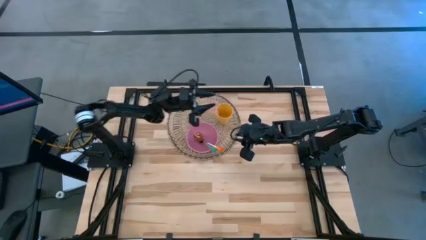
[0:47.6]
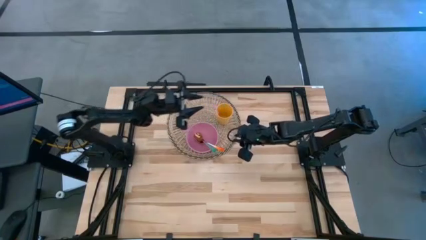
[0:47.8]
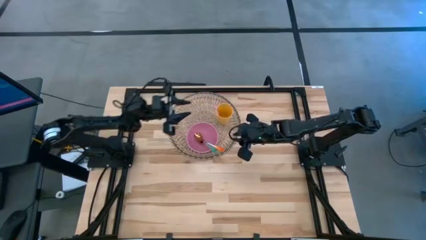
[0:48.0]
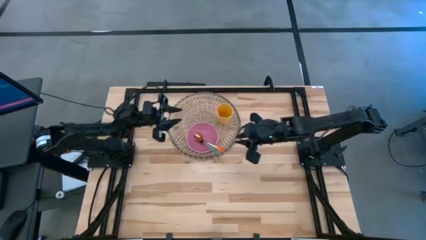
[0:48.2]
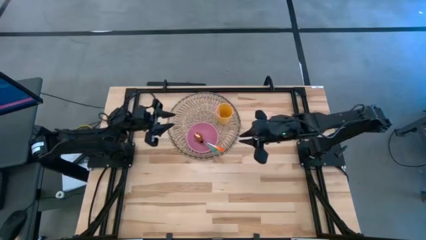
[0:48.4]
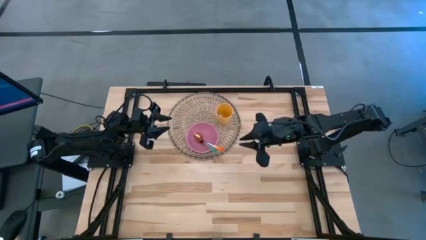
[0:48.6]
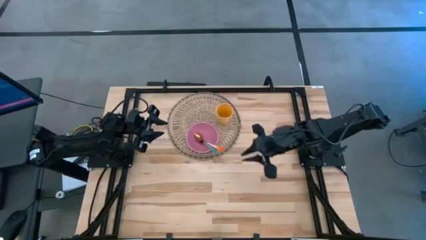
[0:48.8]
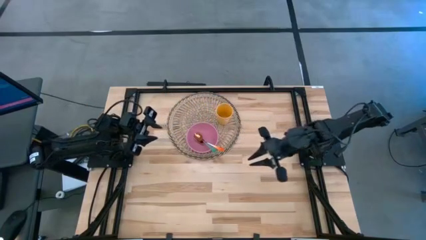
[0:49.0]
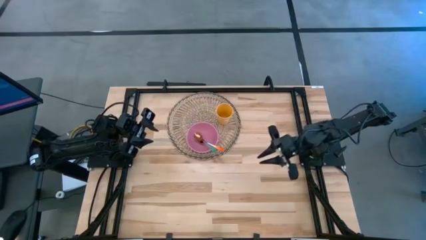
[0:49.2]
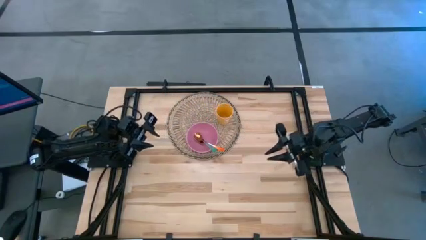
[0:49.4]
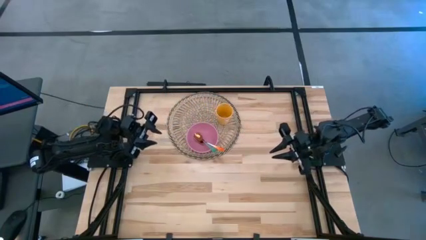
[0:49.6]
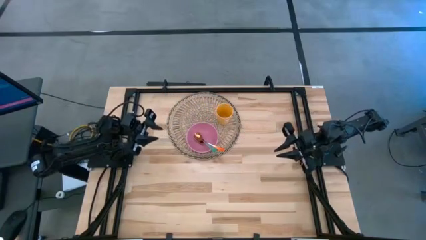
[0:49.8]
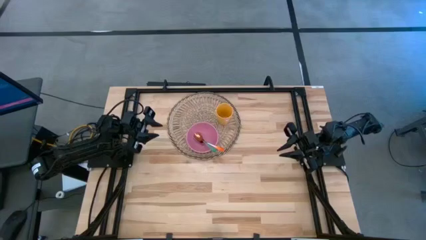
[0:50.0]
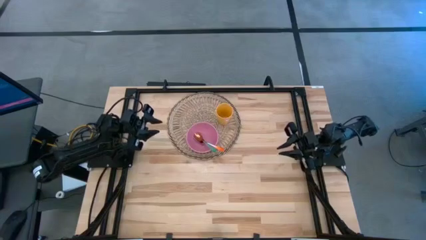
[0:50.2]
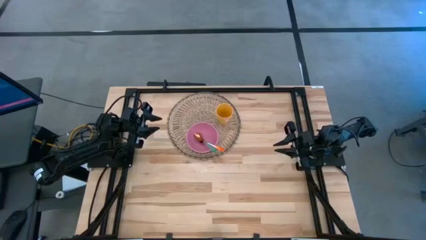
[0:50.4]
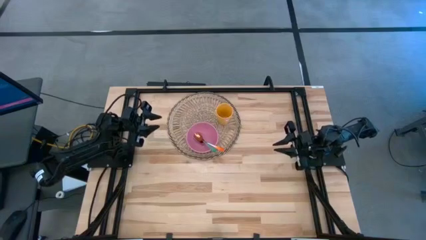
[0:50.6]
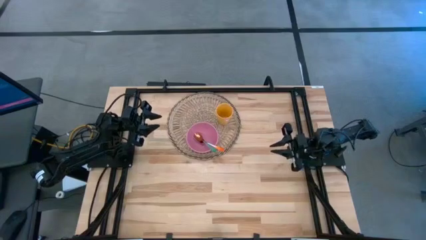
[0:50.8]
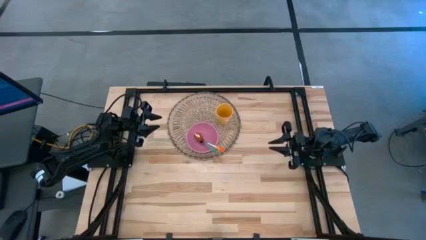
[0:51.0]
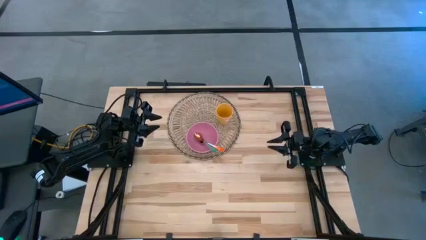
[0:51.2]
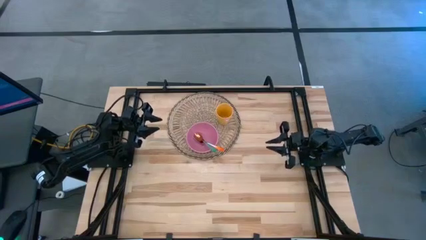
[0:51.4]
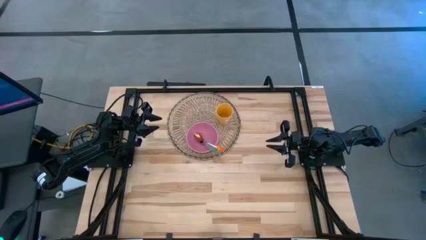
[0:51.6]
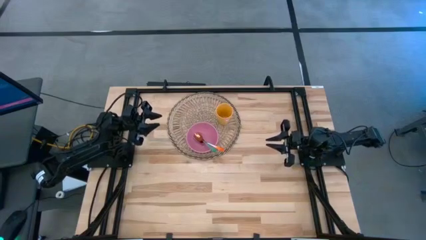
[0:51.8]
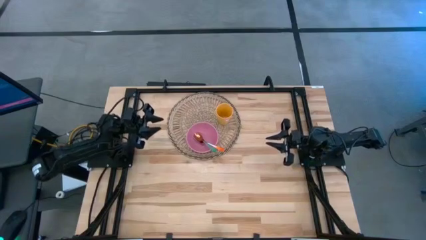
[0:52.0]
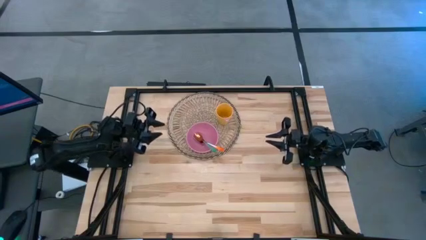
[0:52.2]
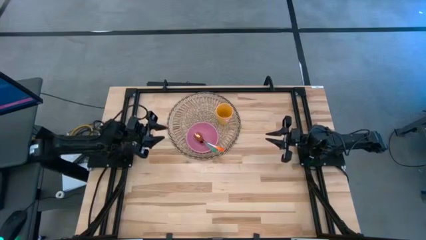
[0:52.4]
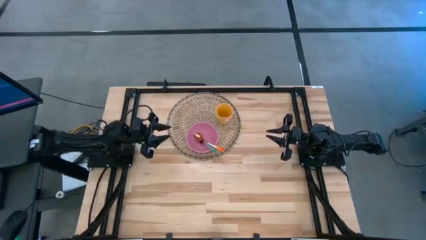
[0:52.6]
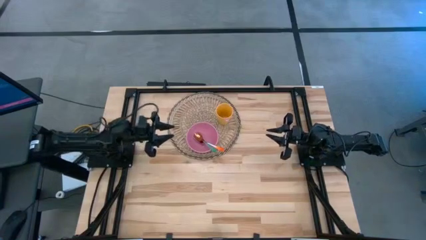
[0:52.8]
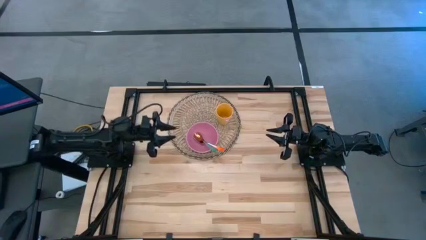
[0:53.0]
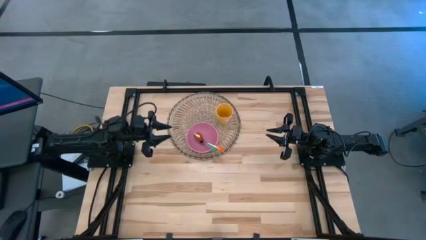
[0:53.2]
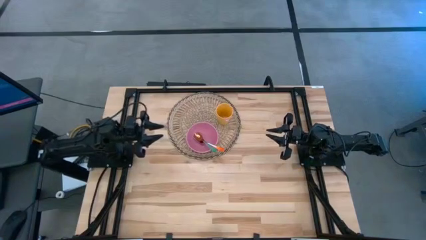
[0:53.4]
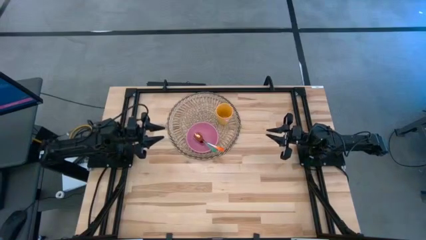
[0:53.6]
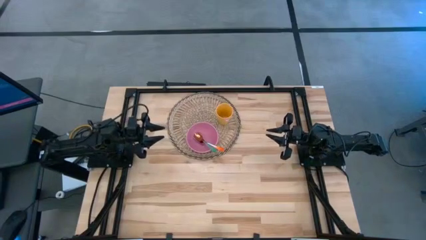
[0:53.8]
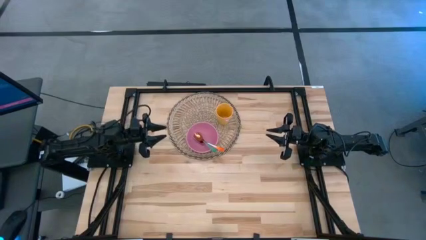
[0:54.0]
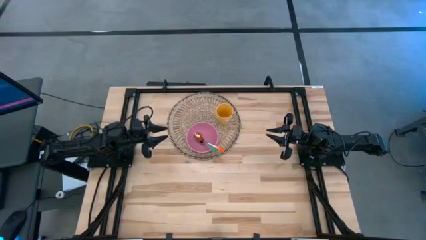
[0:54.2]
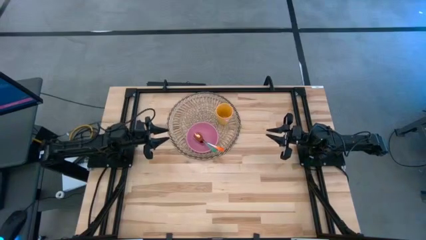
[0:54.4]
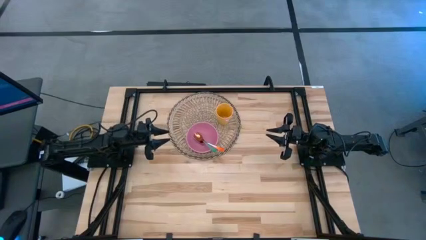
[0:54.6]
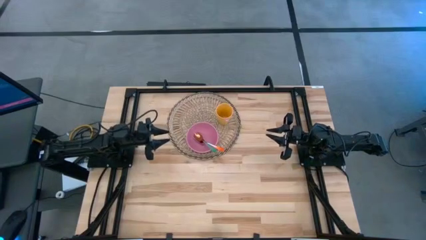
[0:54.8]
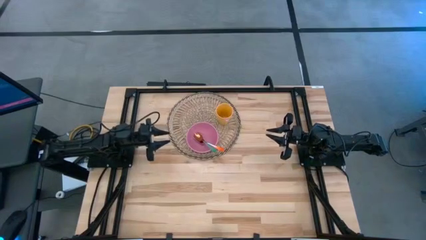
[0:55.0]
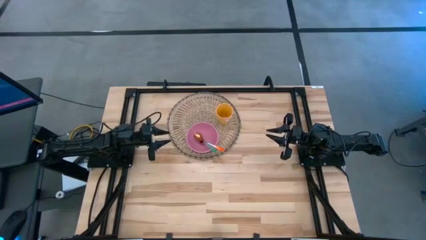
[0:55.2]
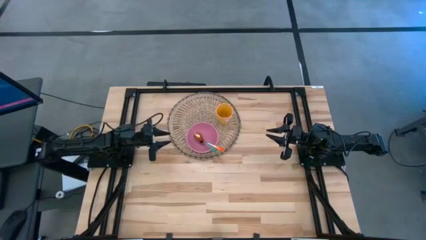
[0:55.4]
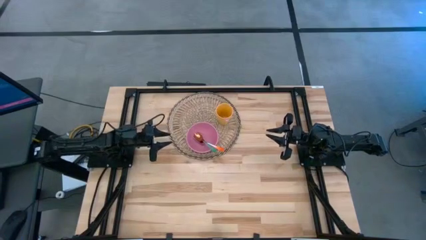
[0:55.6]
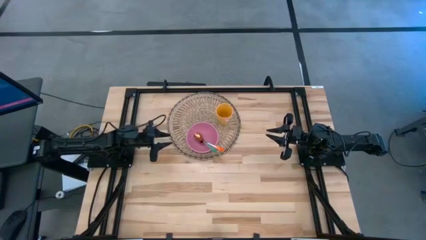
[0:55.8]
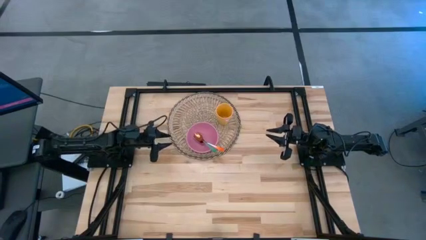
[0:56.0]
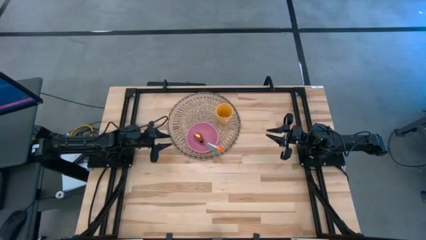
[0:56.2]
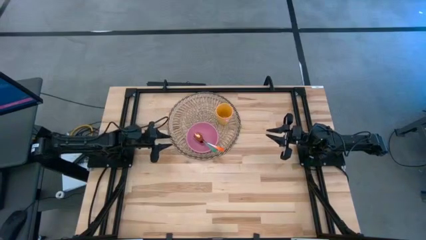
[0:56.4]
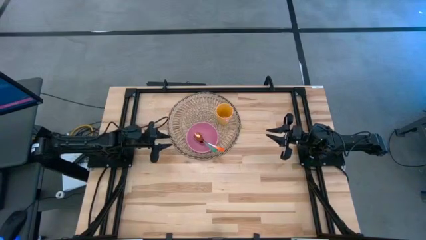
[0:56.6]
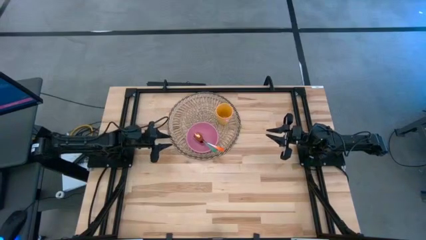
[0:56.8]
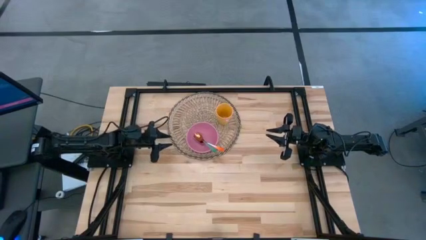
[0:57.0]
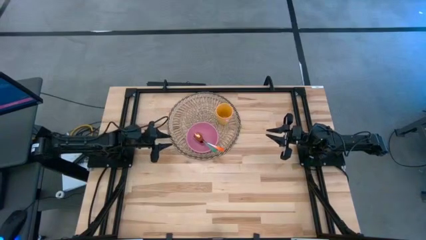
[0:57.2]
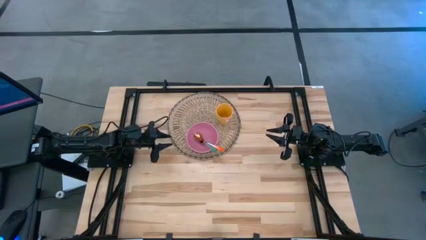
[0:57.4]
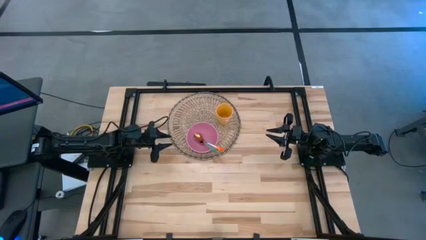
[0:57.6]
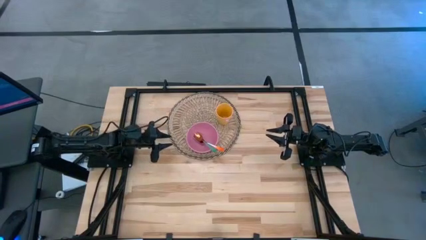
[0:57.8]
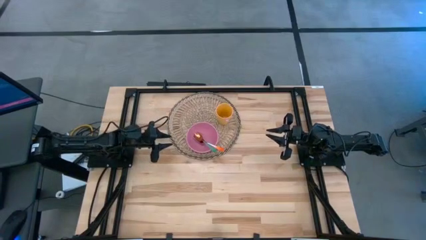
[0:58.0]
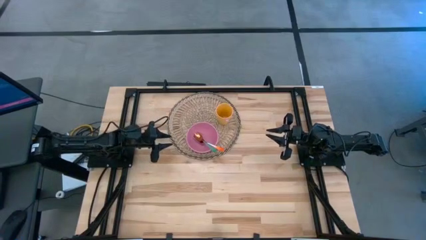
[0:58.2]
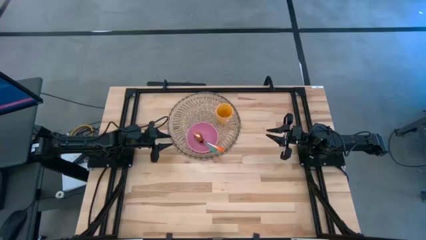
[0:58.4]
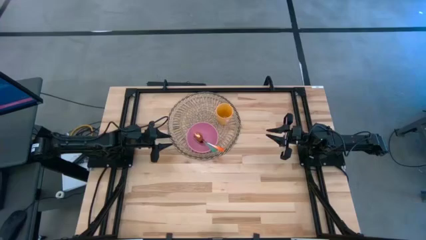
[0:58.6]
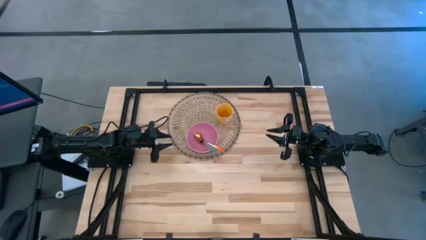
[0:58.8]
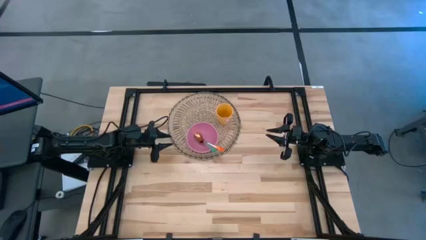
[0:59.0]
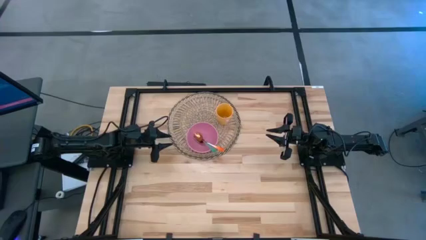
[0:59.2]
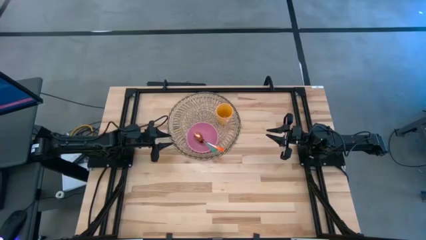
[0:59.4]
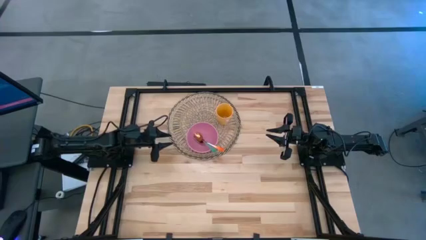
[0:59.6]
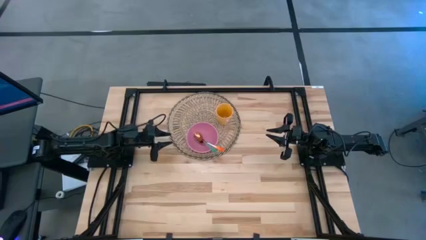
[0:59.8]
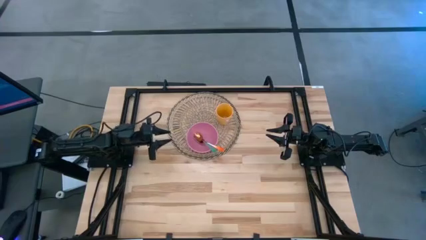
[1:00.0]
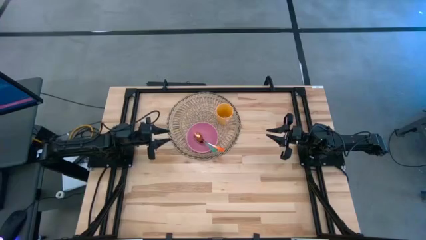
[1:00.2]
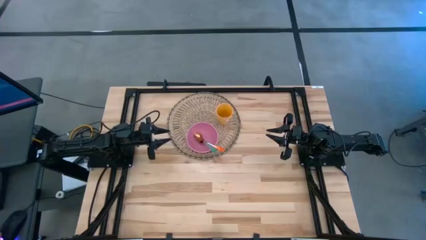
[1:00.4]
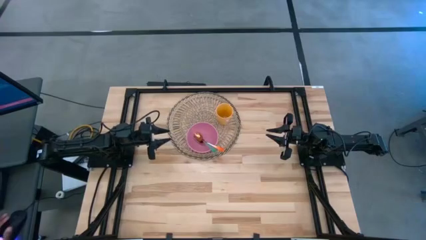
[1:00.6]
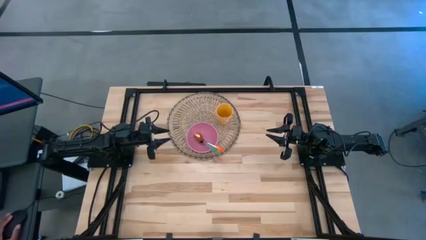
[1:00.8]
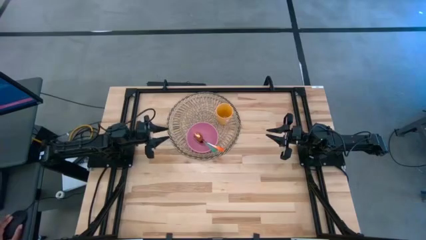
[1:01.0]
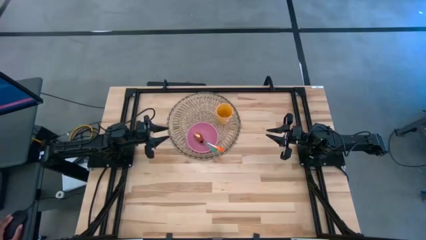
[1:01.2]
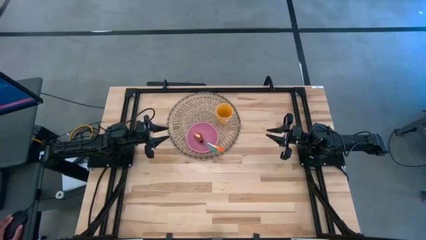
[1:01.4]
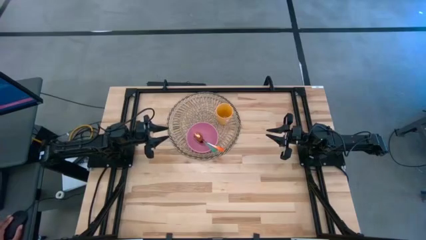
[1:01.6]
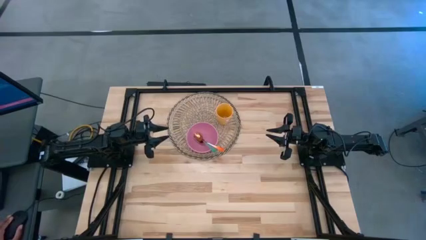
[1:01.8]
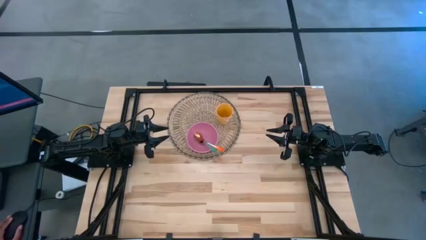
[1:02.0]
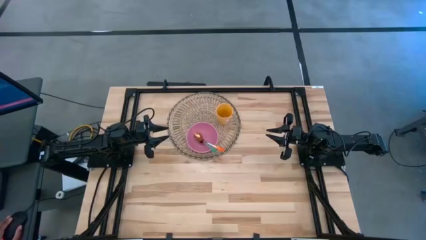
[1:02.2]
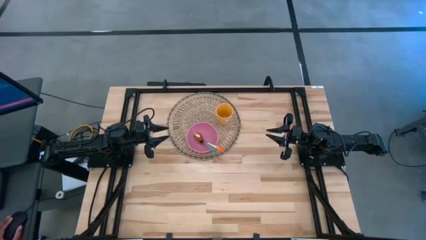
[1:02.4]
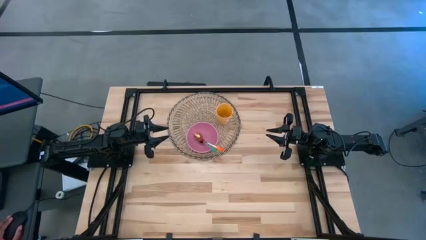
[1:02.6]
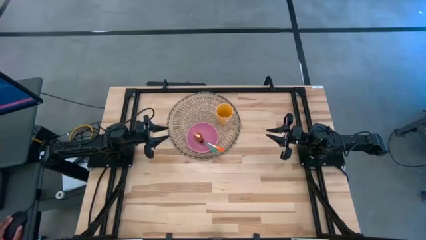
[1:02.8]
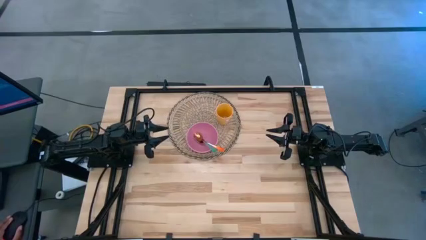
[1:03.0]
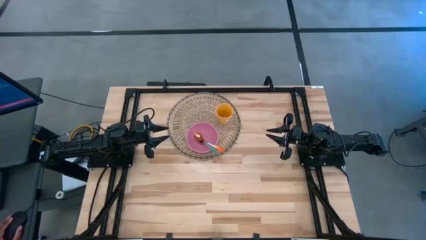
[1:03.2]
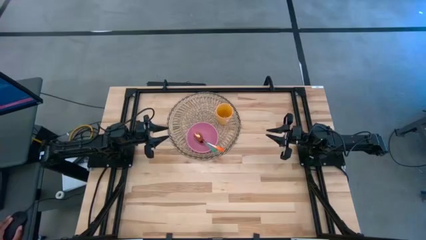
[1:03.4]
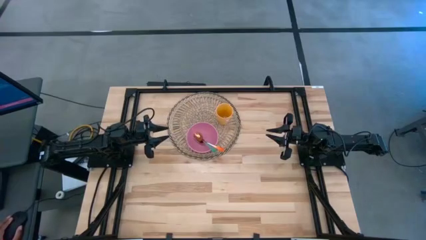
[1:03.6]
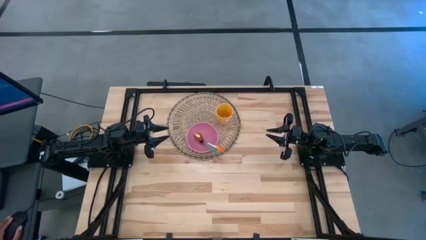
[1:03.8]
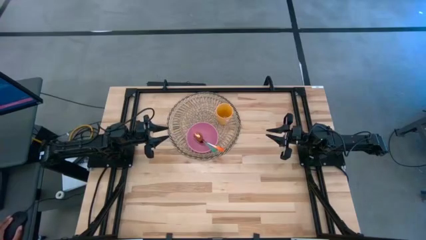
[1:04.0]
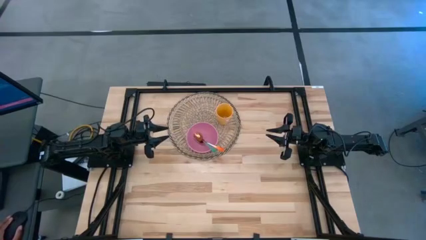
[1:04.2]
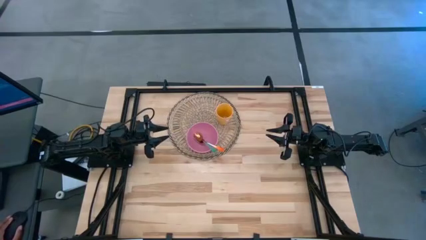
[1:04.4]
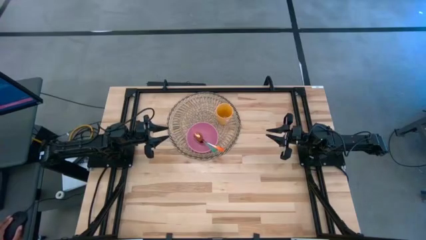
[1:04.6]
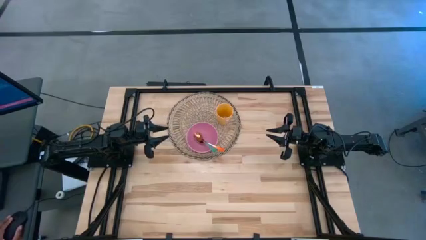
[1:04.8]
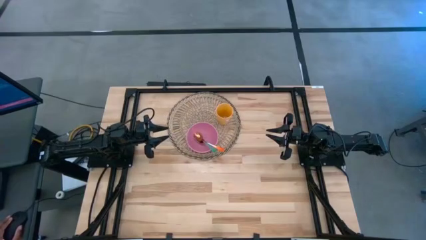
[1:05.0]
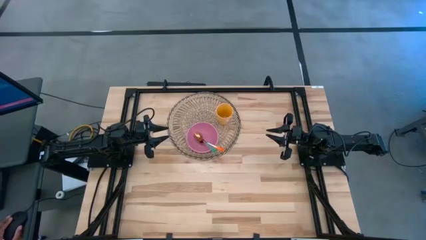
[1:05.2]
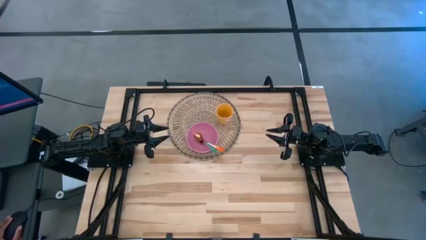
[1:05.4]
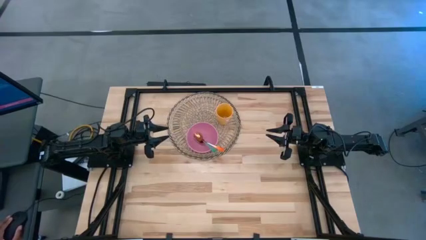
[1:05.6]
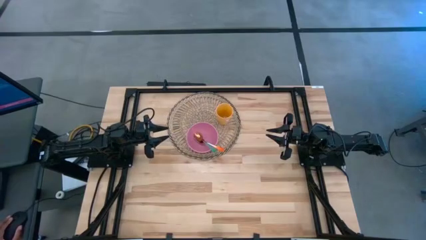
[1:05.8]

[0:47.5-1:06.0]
Task: Pick & Place Utensil
Return to Home Position
